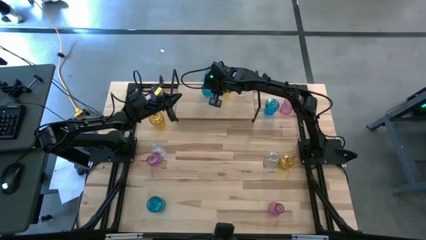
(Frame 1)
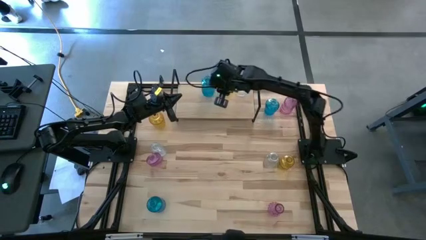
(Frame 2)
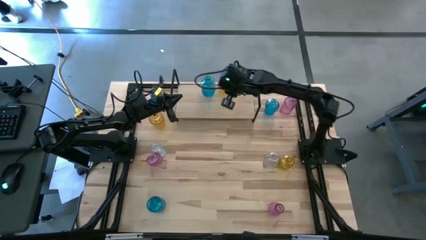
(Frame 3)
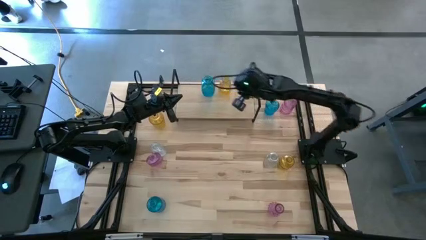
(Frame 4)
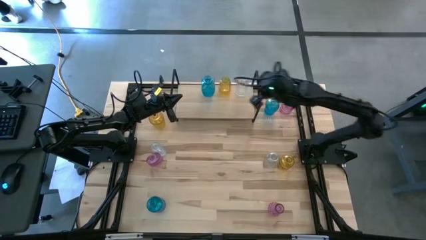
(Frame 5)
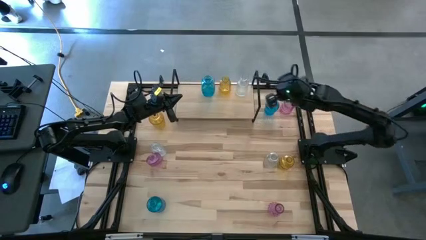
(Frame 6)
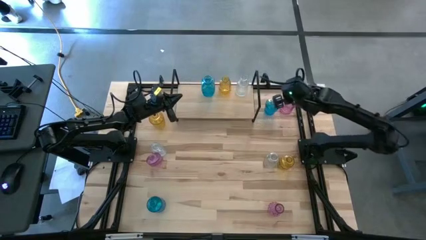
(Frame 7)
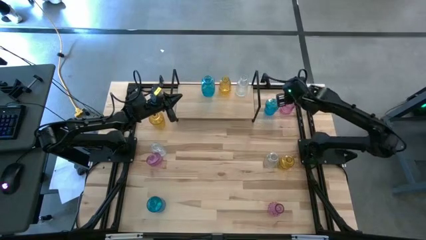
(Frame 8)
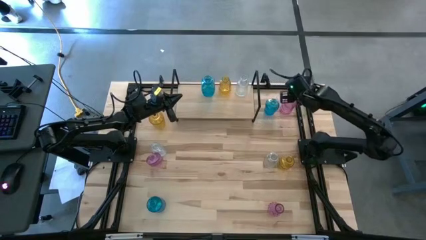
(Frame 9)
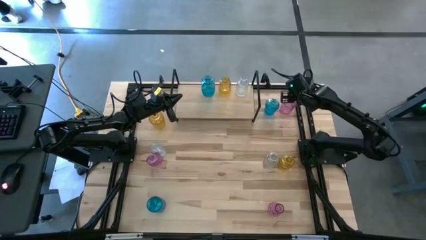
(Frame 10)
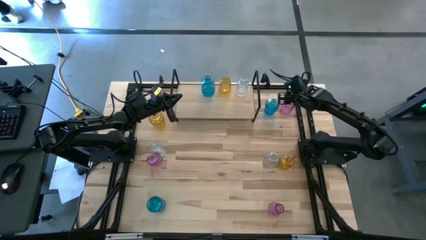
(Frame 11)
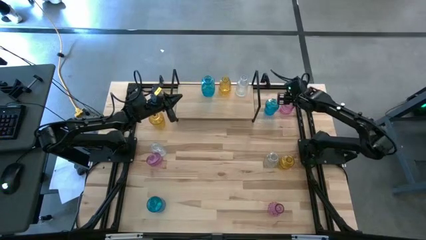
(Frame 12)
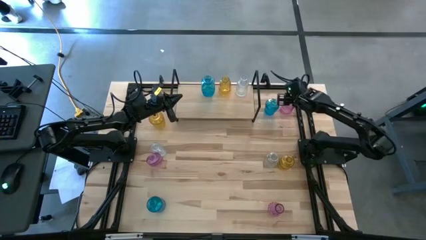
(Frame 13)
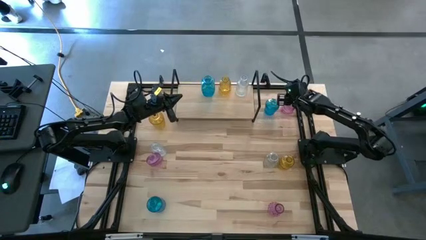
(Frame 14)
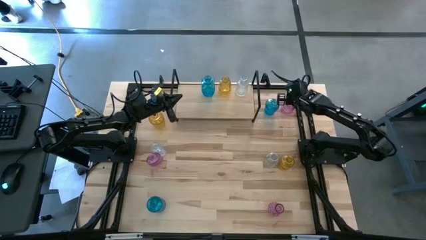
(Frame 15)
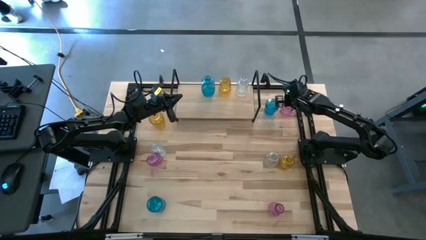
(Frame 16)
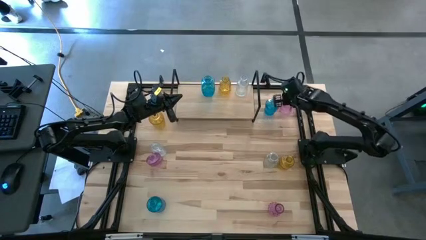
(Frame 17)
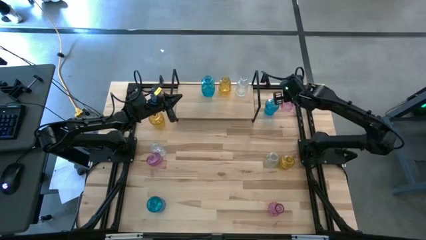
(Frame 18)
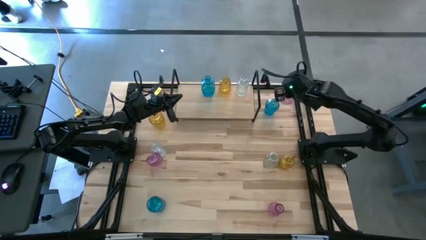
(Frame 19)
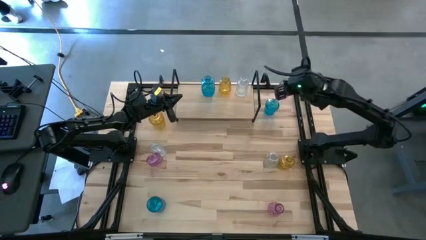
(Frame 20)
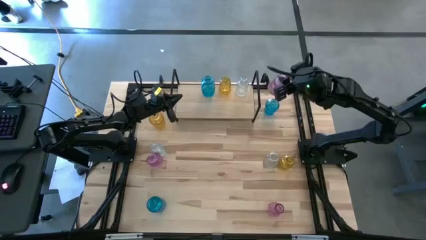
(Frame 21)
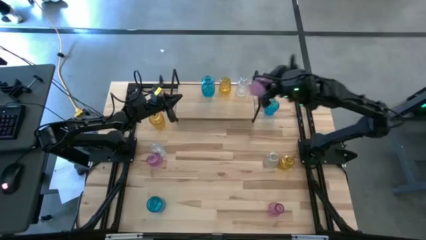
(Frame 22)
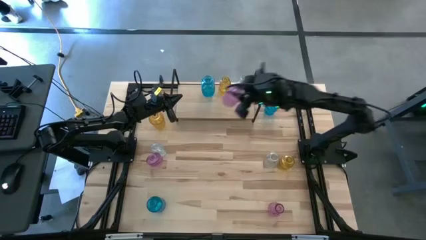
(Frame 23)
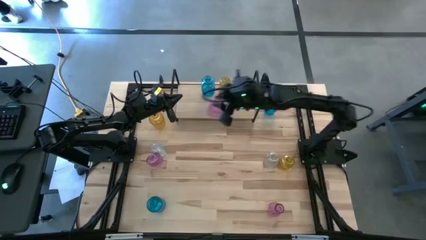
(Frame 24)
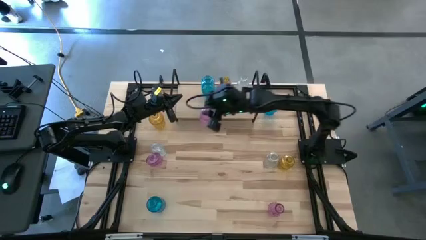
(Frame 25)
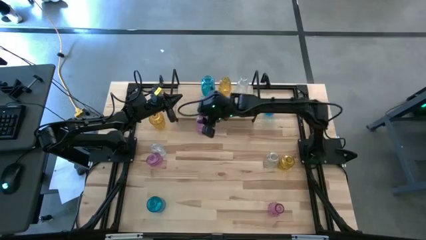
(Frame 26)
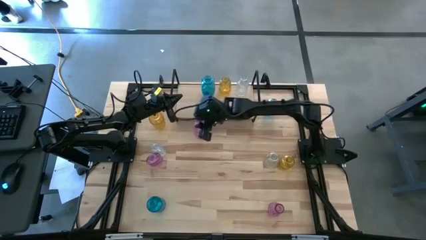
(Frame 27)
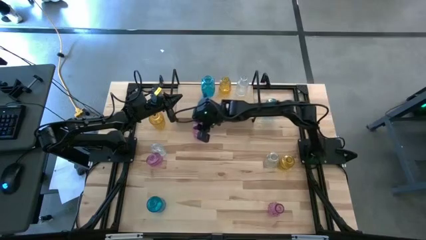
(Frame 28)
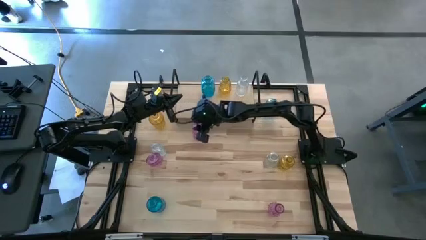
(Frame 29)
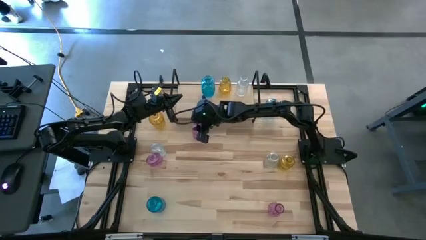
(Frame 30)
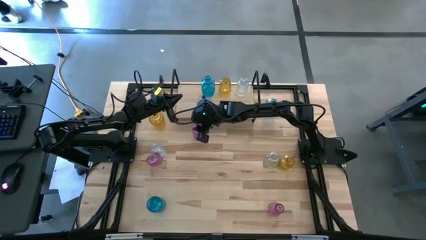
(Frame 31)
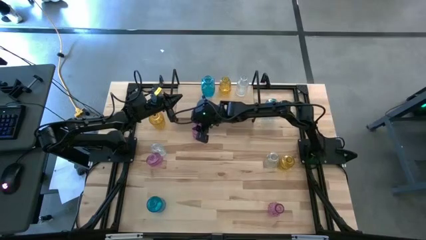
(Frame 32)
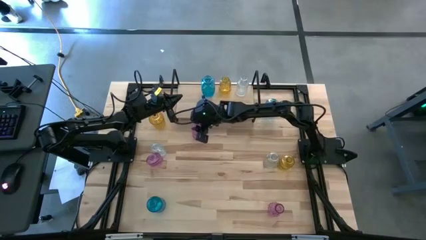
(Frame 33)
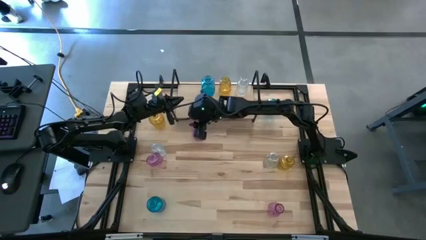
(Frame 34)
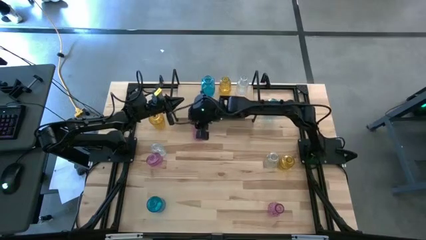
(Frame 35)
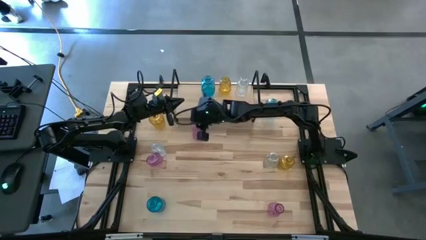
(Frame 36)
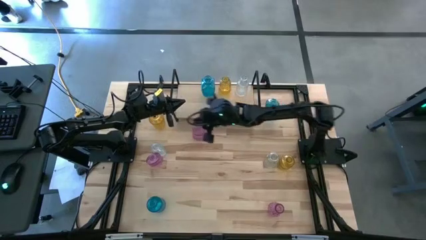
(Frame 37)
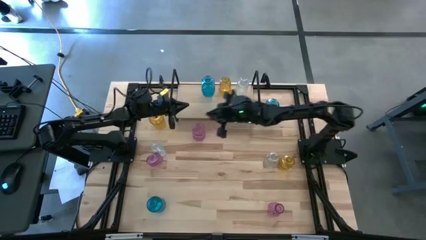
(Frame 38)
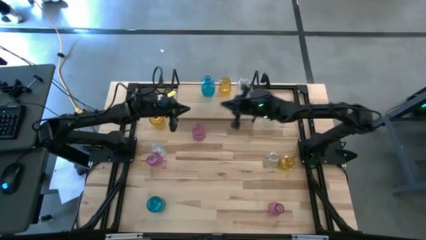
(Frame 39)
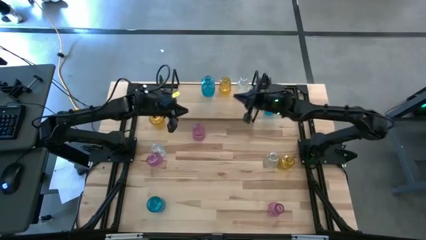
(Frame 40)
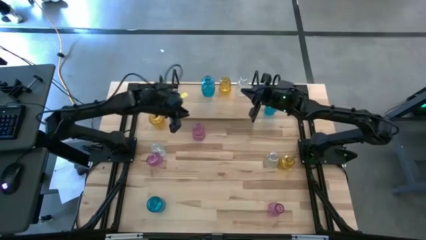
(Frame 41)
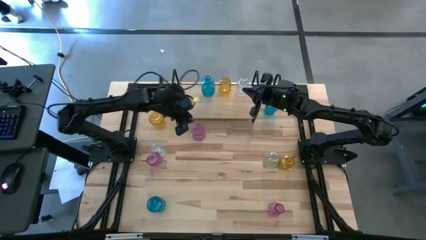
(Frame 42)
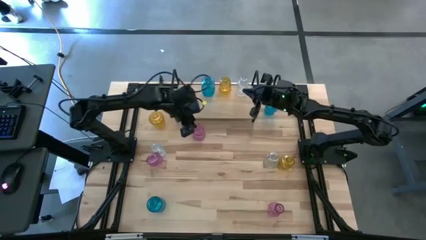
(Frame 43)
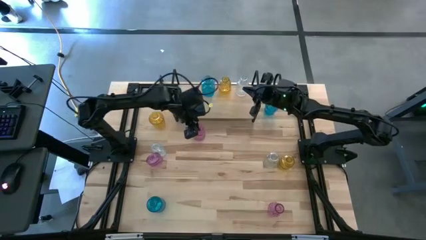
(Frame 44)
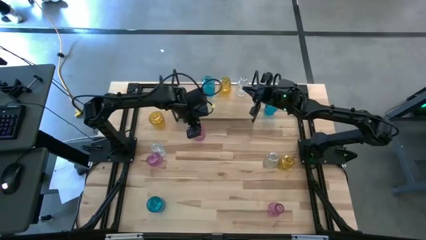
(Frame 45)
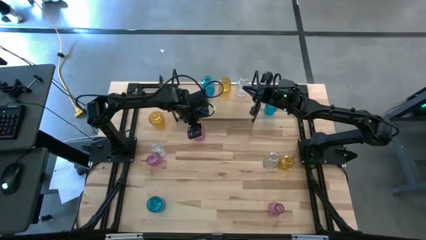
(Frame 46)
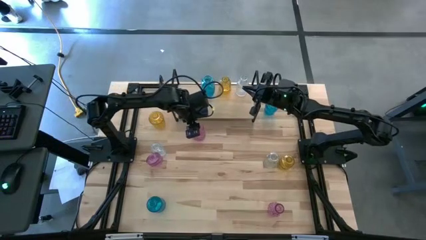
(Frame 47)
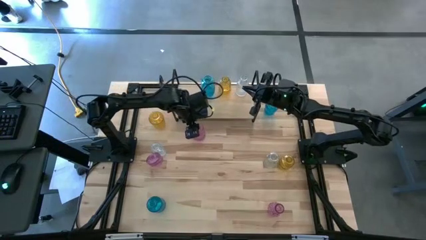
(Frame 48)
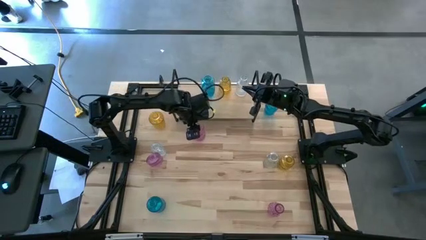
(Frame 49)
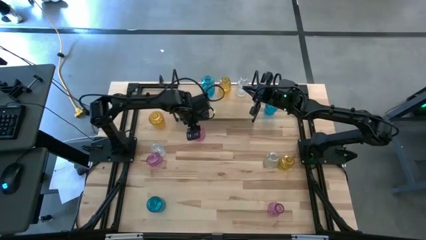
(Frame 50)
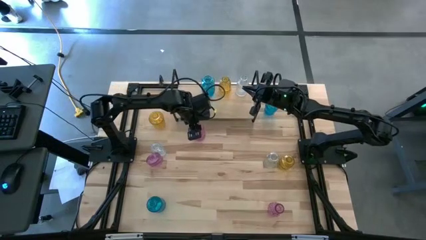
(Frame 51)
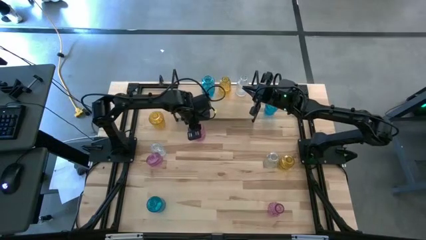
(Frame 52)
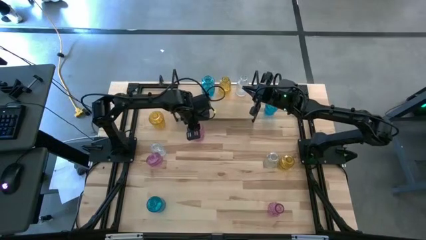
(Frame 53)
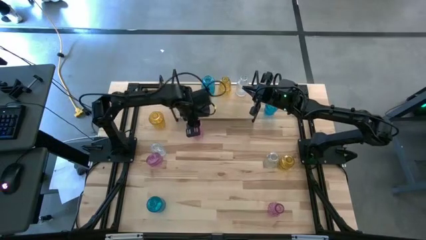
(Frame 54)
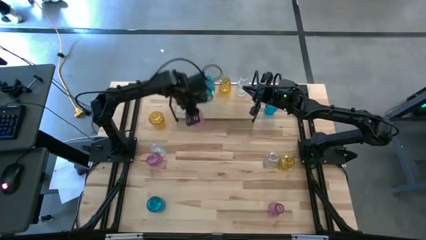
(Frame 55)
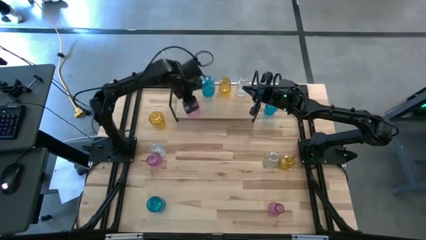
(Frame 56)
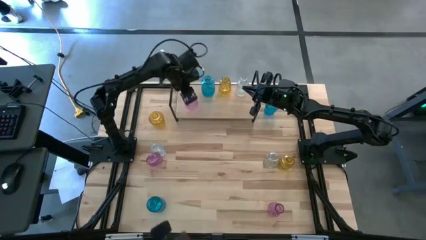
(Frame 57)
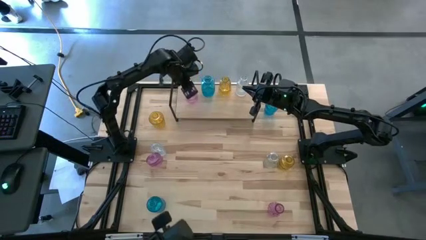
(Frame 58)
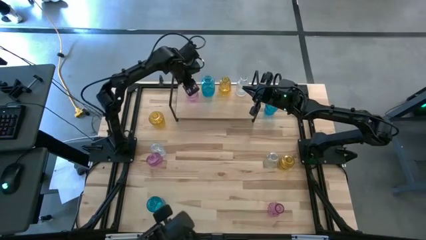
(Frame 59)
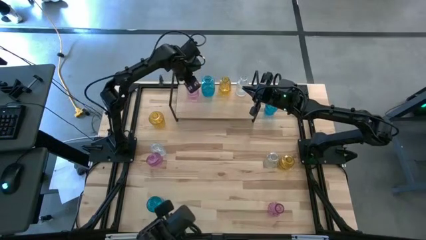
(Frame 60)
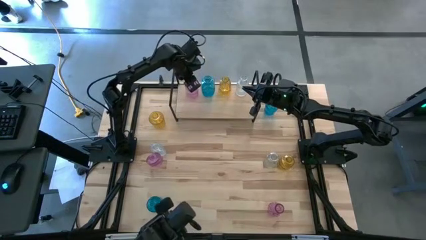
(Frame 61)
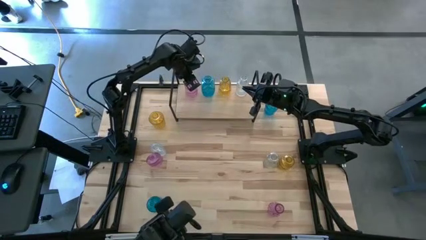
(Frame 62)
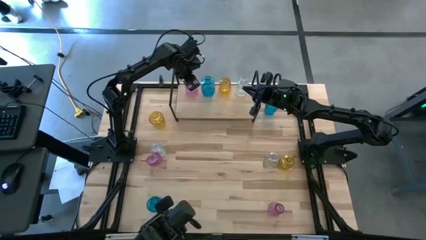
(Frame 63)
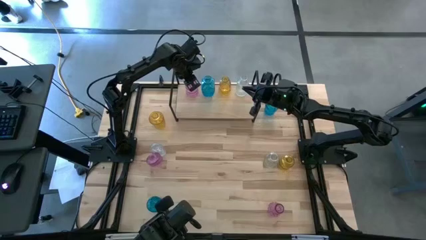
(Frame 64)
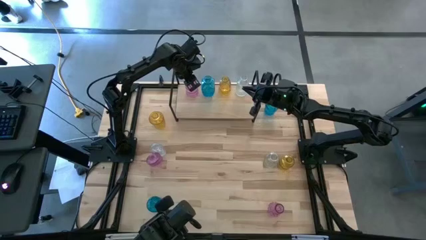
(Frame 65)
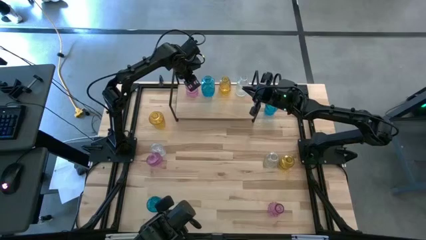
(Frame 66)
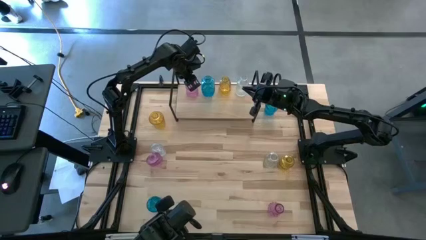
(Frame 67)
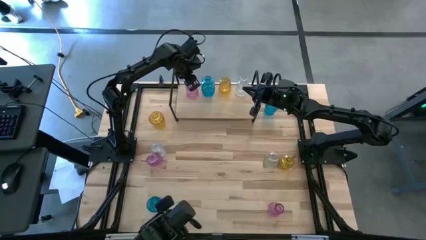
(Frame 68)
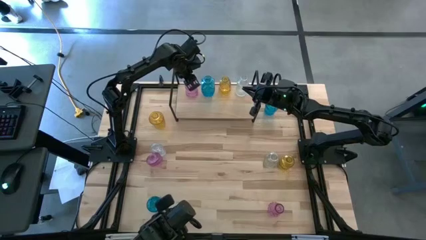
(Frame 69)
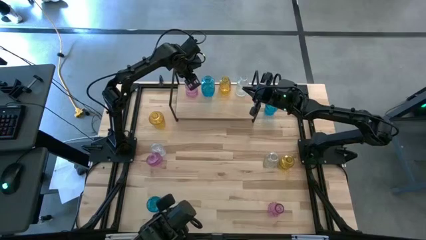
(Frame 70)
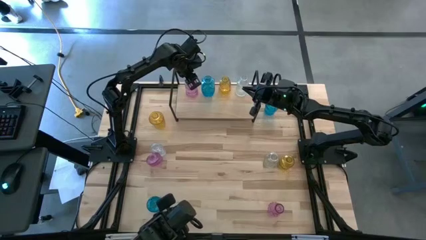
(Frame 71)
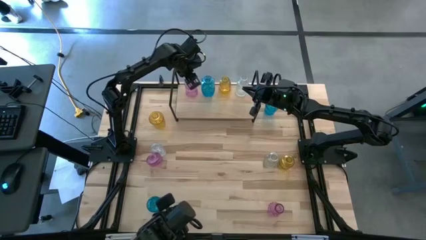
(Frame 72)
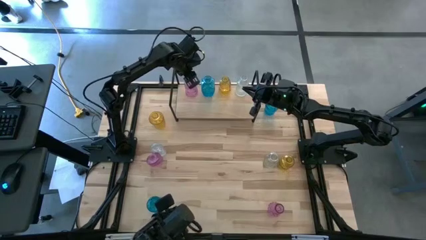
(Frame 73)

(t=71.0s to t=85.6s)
Task: sort vases onto shelf
Put the top pink vase on the shelf

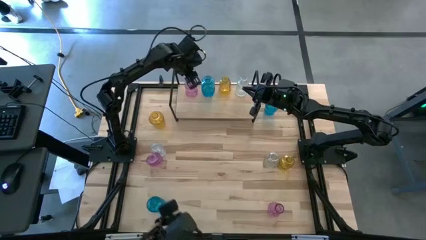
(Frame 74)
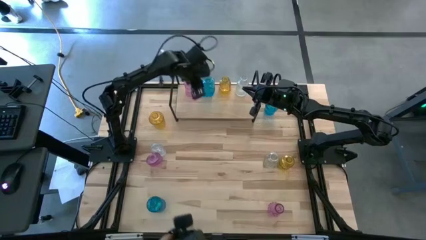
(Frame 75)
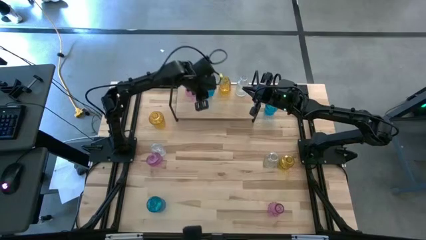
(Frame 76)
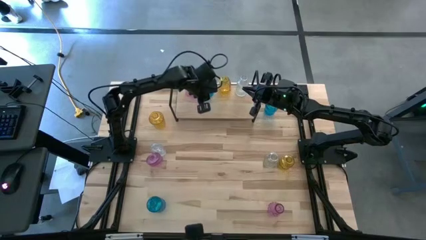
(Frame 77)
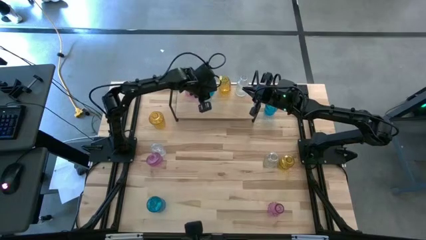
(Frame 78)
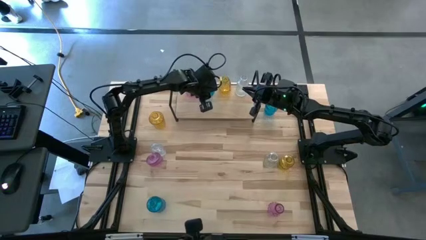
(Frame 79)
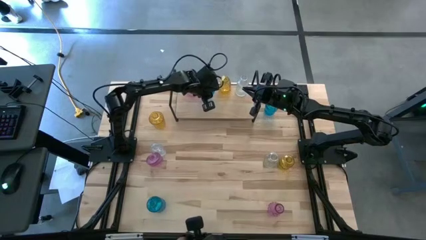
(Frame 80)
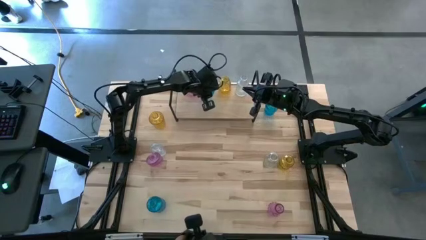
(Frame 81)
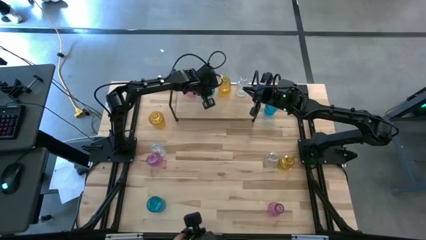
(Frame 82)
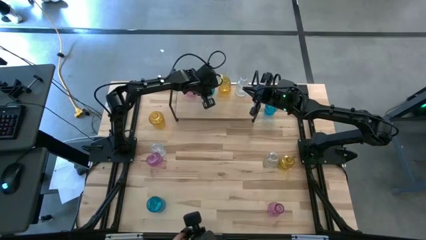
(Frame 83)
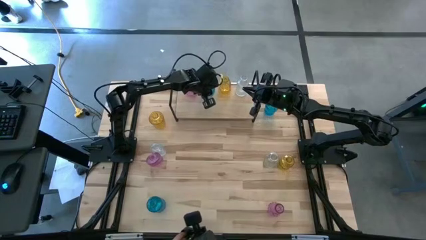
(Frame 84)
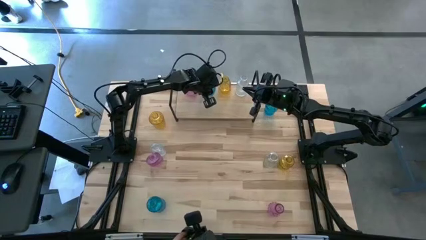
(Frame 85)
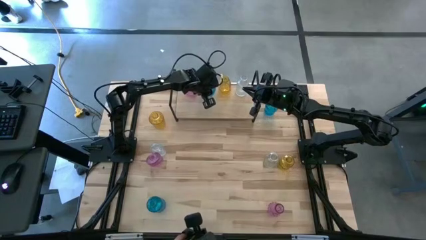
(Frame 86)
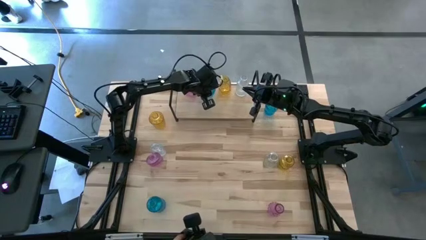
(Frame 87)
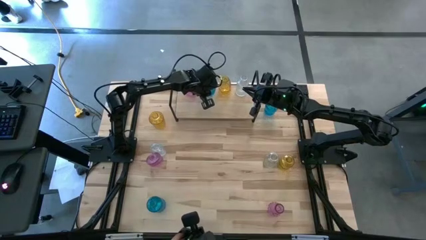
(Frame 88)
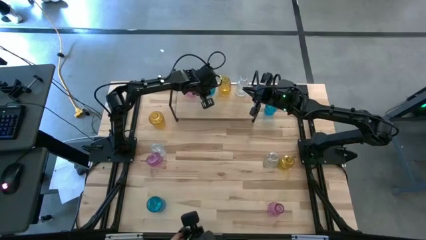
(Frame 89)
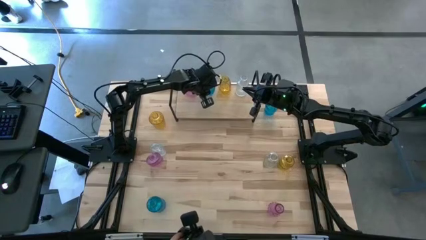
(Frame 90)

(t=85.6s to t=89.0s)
Adjust the blue vase on the shelf
